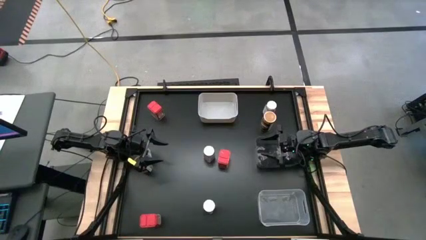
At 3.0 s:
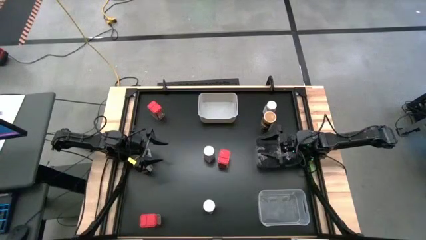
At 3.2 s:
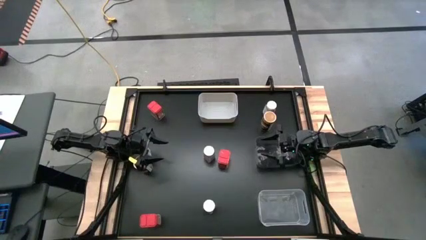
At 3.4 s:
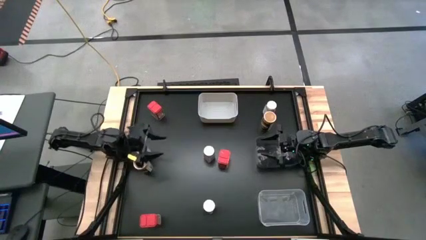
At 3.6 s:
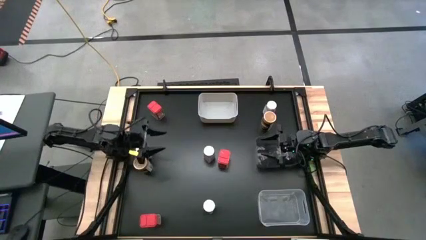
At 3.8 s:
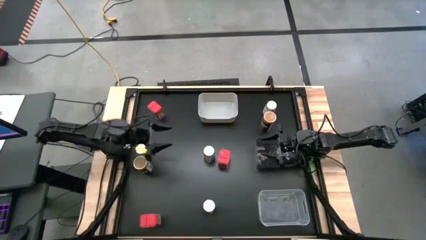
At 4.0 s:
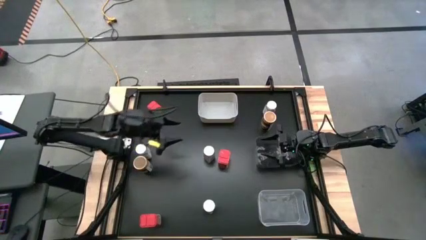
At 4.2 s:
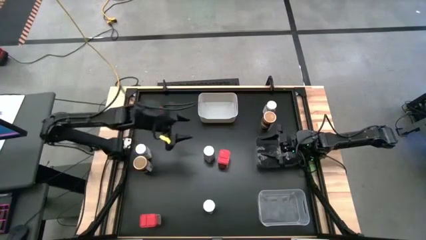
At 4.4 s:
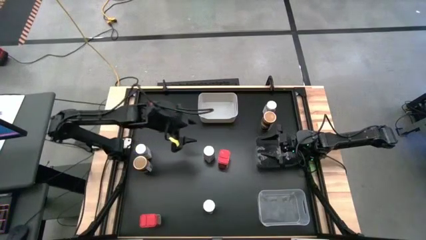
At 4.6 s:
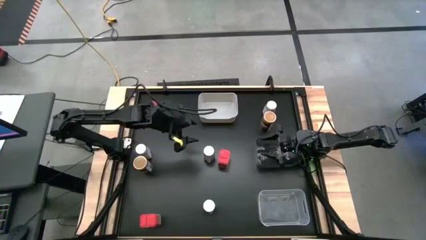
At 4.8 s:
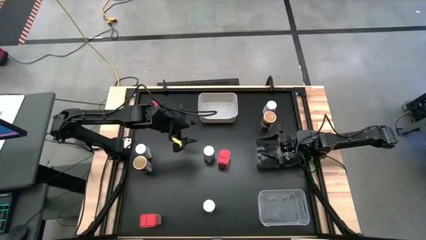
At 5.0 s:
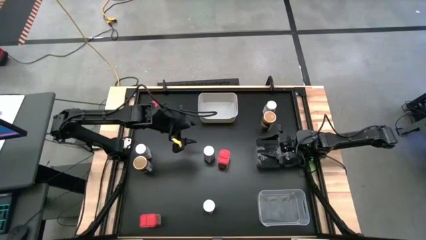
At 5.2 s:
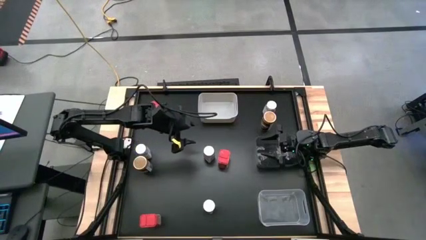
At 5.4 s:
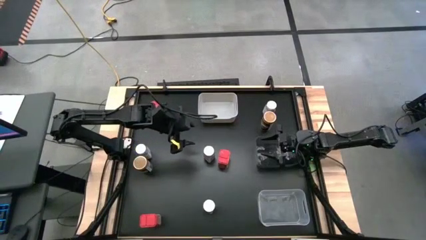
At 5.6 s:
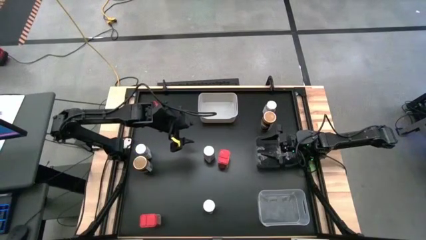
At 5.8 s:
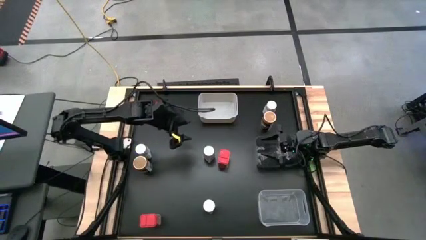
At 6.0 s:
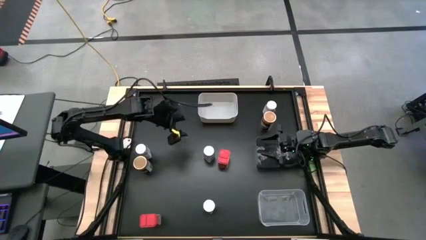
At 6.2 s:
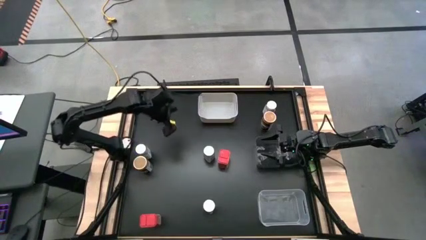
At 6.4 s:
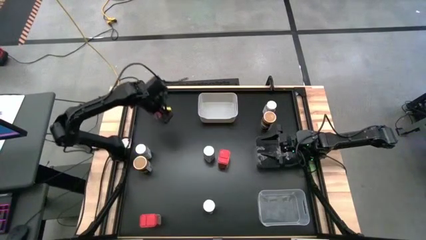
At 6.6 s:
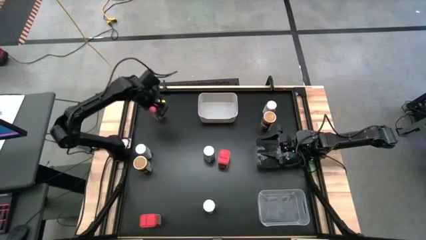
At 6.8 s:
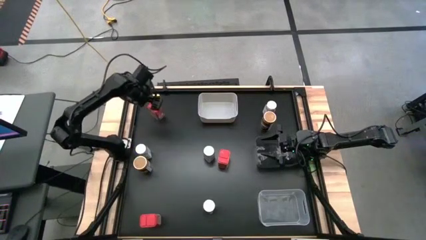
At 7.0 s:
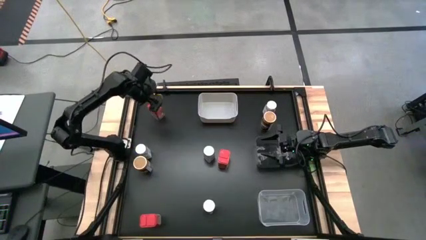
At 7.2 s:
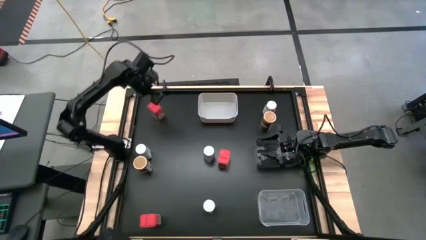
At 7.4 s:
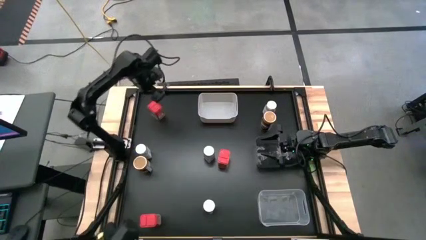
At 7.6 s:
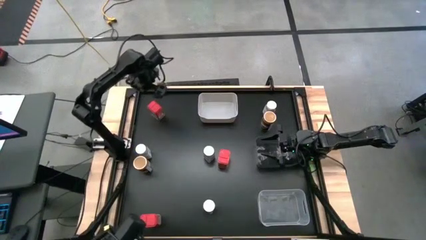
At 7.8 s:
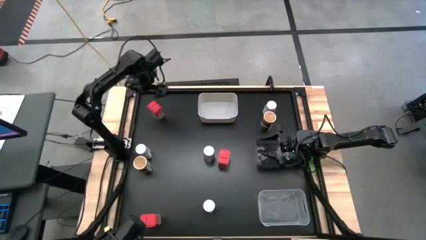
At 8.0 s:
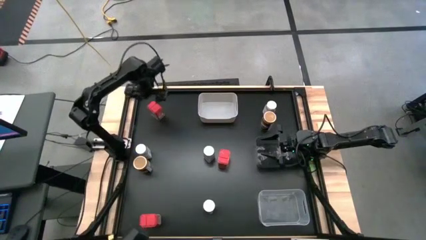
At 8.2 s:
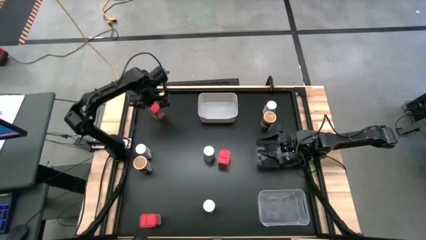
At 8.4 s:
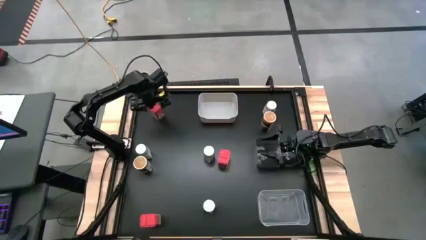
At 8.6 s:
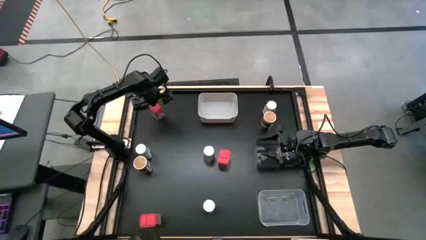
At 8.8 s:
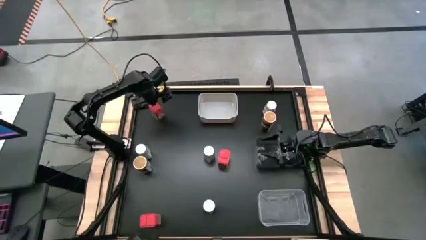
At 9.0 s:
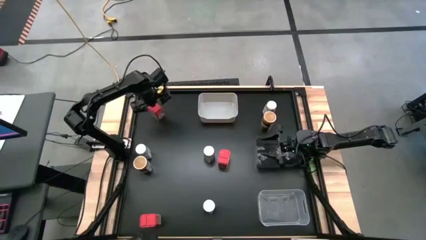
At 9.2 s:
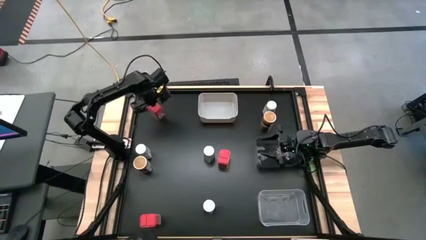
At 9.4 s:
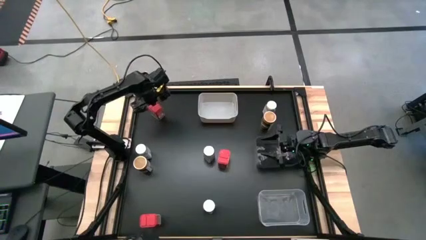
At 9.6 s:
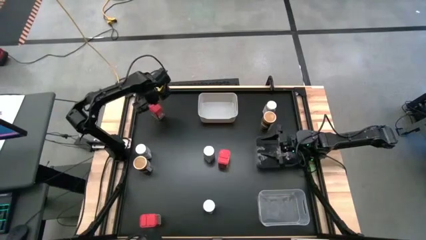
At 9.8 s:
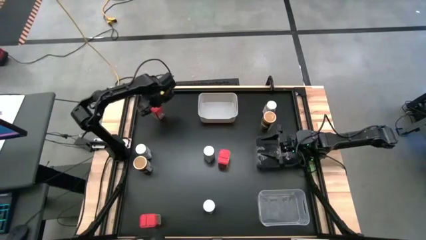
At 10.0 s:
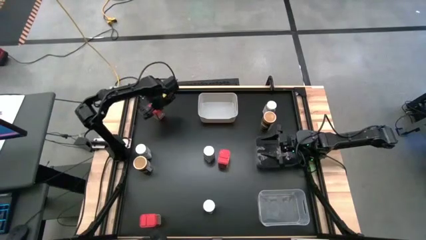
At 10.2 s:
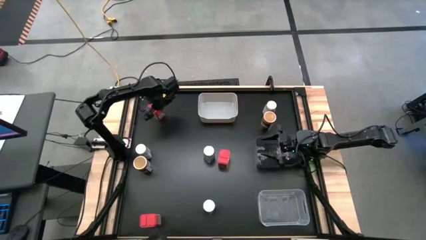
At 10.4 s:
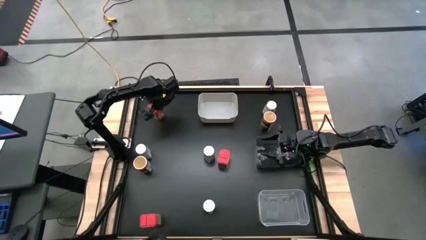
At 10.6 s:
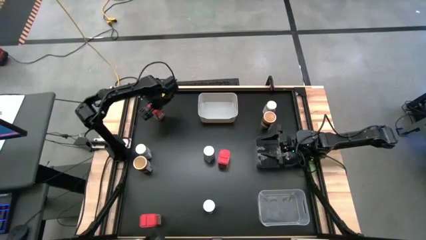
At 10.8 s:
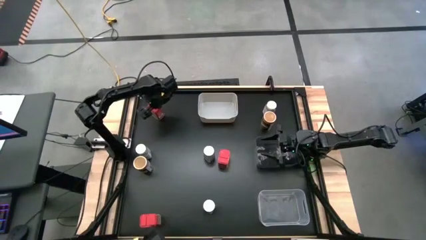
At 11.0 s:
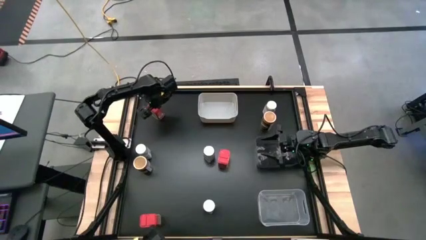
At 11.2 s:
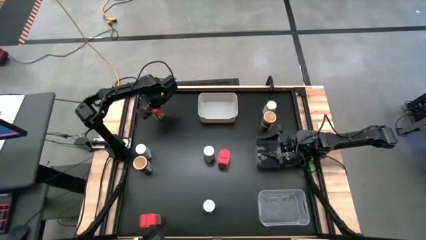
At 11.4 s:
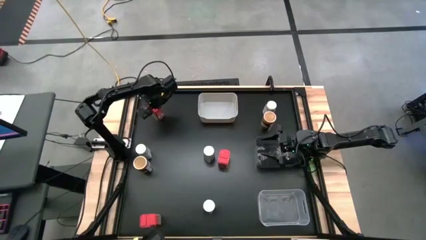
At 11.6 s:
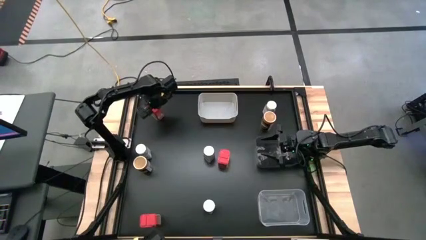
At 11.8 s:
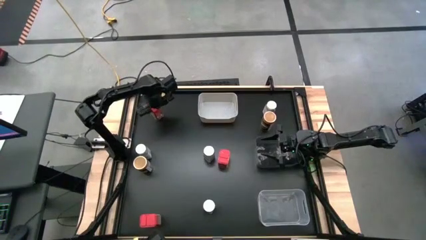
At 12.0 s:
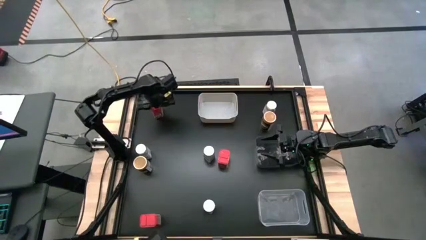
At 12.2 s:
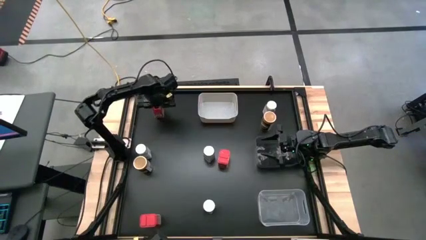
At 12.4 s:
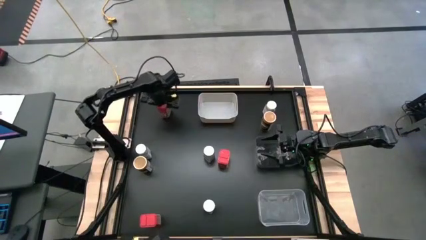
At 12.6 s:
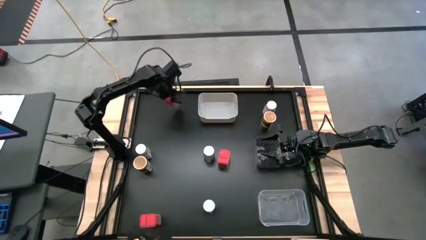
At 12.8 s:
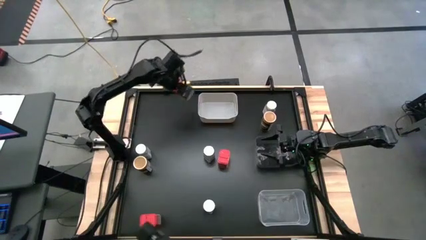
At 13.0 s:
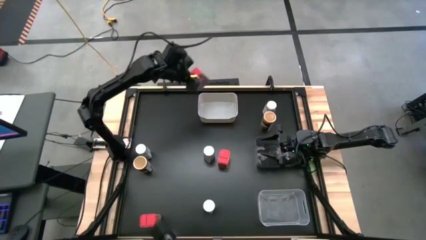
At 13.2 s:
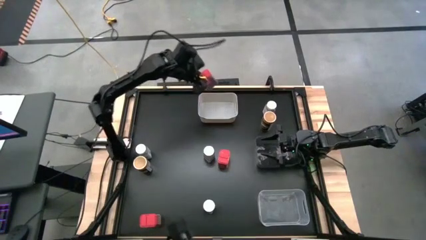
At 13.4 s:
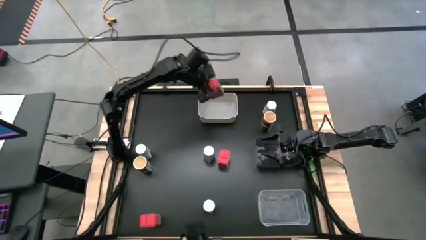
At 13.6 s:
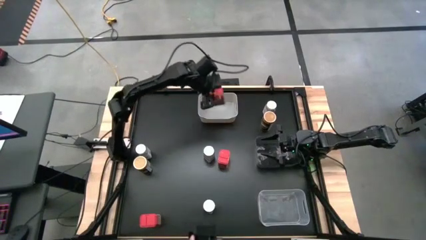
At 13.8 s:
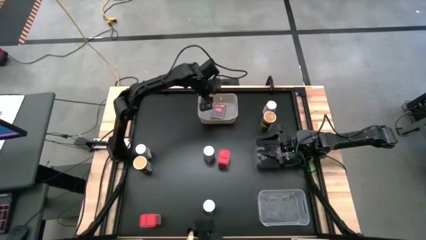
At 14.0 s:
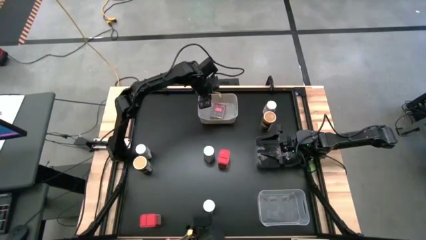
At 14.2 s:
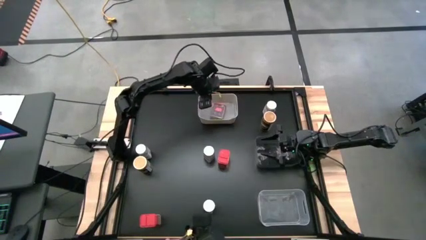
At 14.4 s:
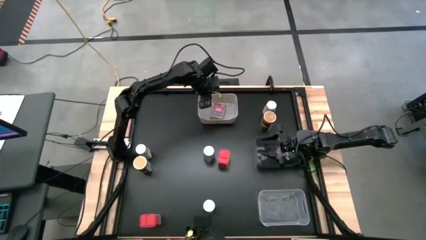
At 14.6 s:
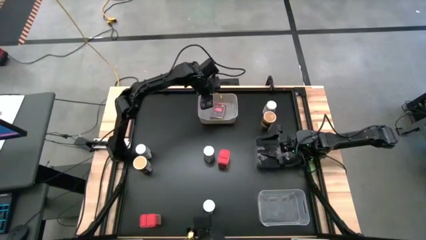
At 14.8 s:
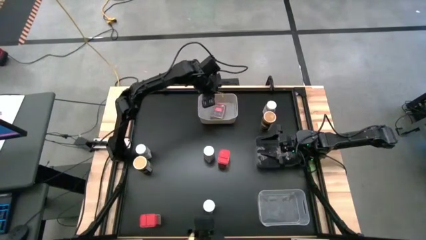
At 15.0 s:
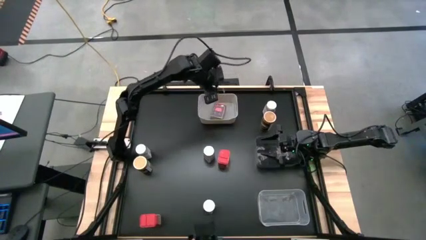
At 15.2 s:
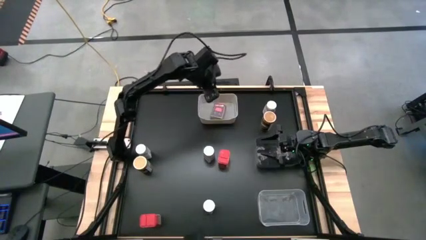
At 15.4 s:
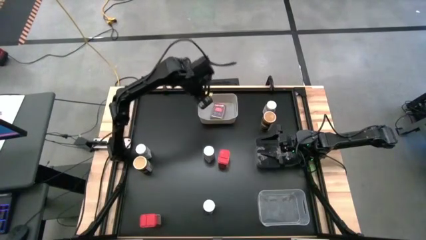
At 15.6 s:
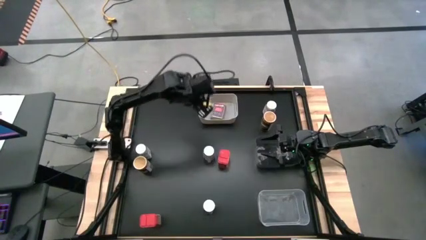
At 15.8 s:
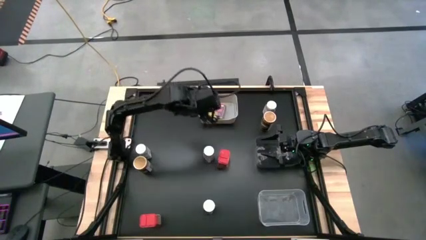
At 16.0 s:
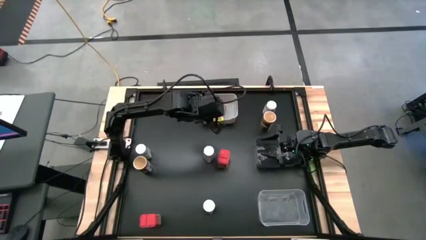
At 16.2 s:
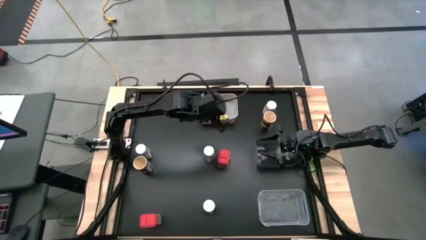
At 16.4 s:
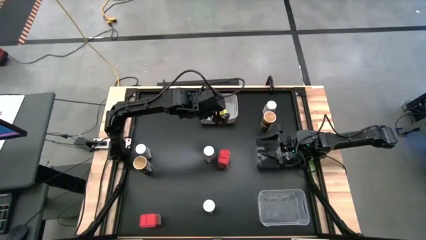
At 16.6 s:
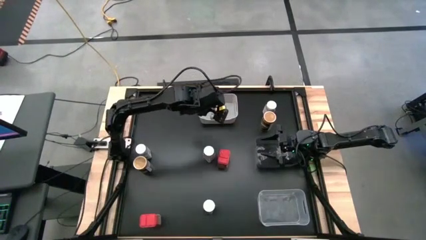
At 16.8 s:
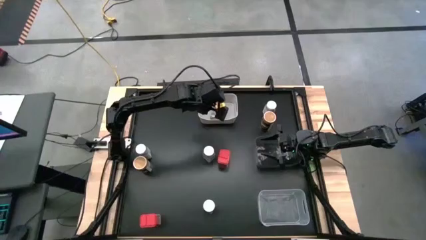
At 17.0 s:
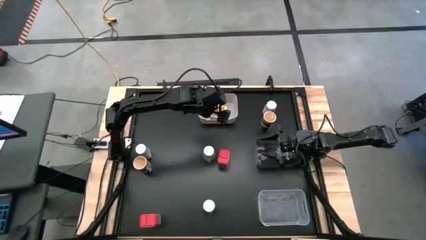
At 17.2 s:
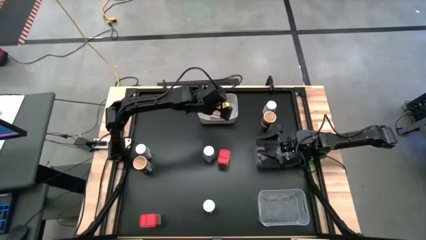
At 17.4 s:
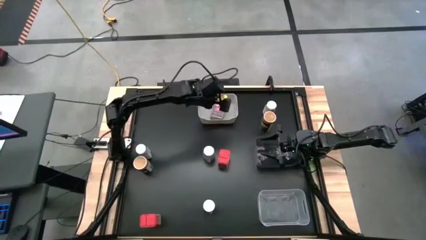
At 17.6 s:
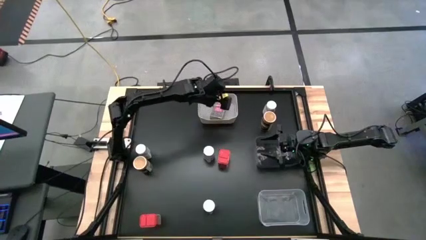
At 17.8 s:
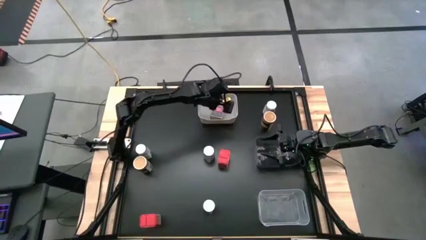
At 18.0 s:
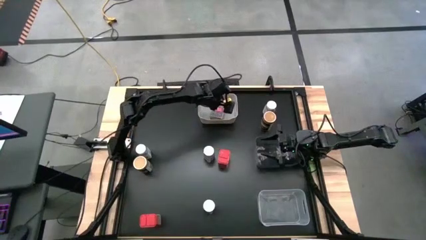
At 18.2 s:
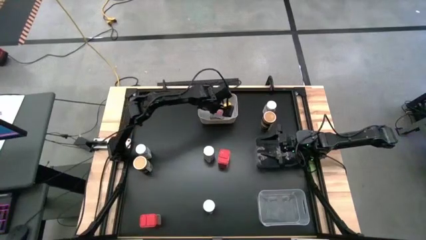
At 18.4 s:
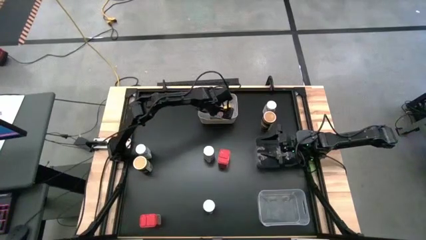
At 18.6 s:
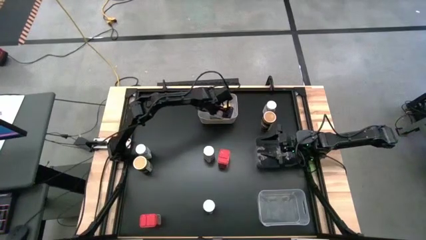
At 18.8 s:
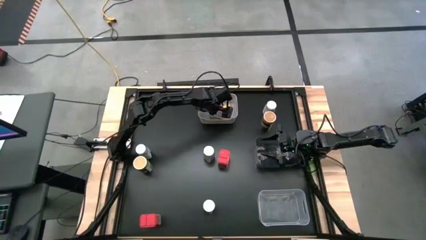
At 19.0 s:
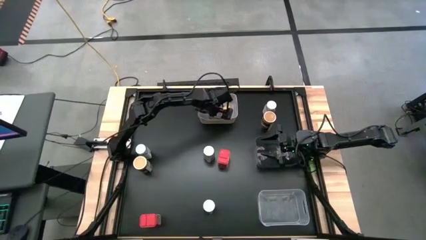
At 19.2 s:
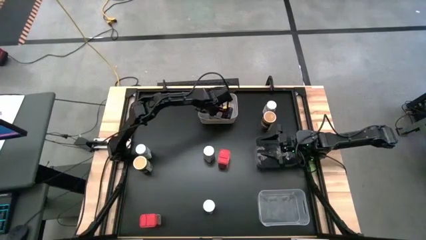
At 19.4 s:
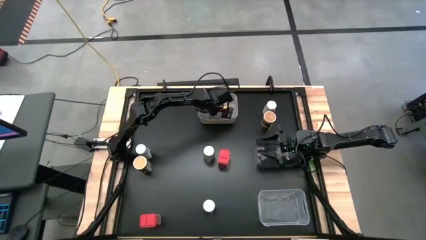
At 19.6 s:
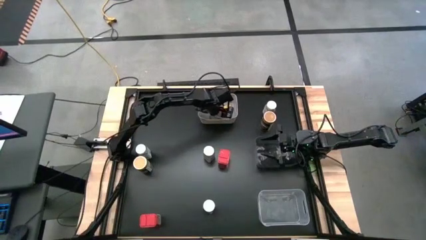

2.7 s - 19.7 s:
Task: Sort spices by type
Put the top left red seasoning can into the gray bin
